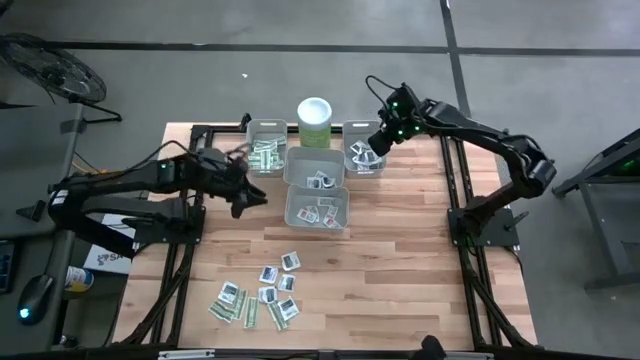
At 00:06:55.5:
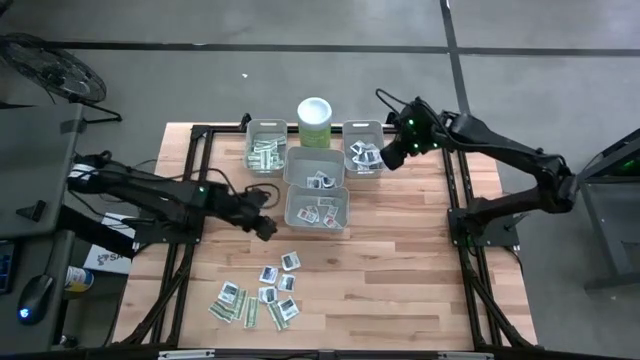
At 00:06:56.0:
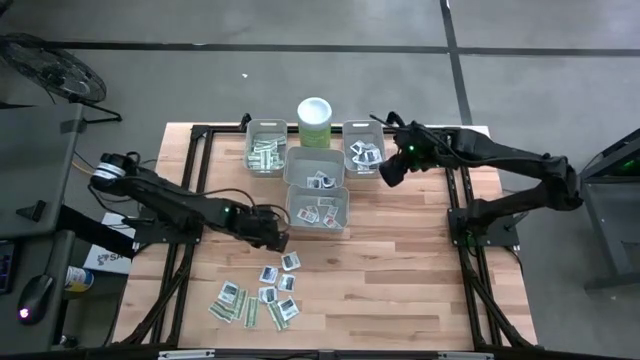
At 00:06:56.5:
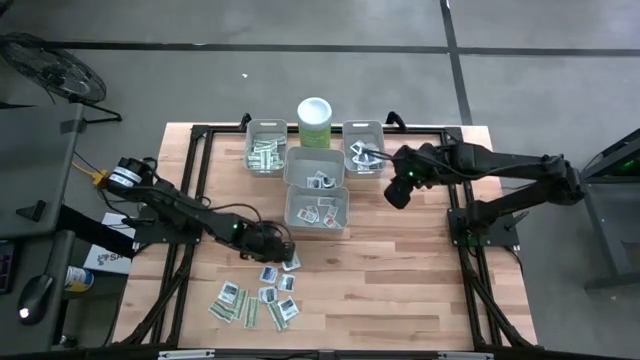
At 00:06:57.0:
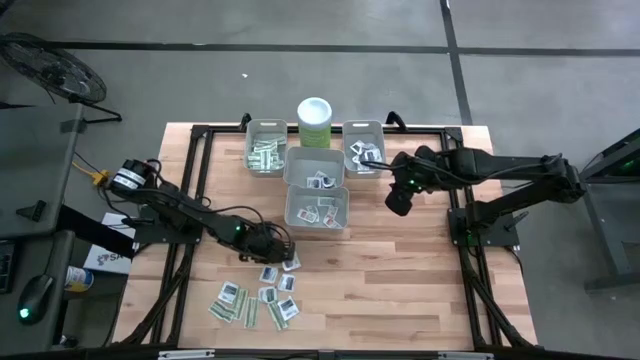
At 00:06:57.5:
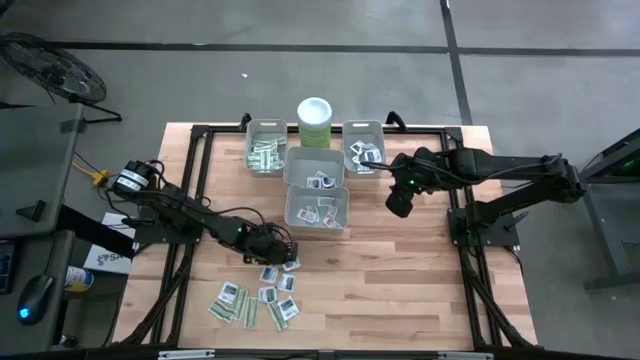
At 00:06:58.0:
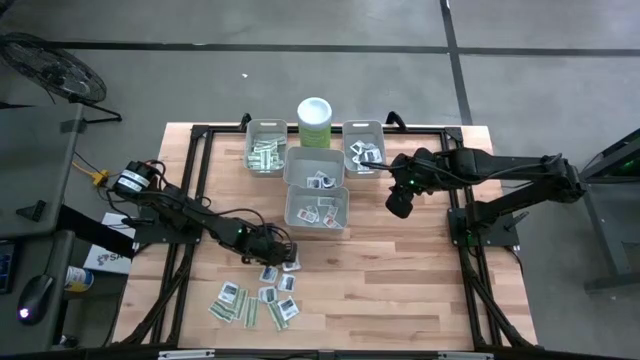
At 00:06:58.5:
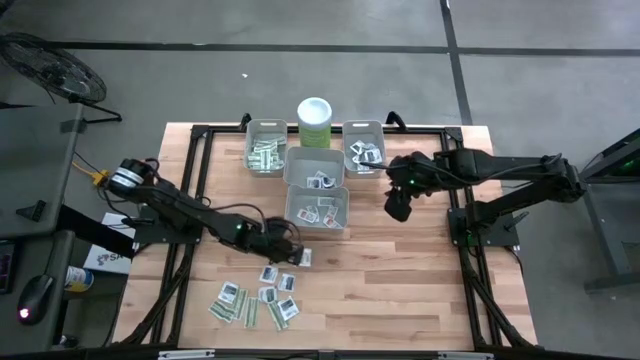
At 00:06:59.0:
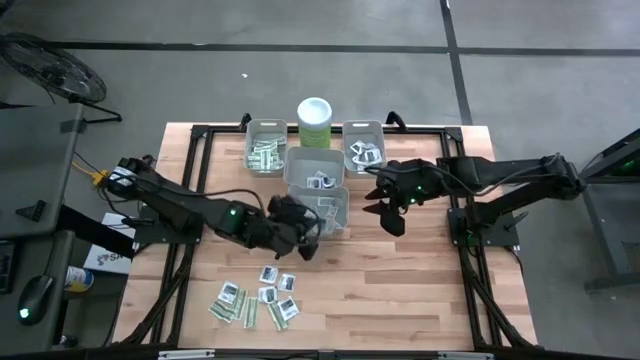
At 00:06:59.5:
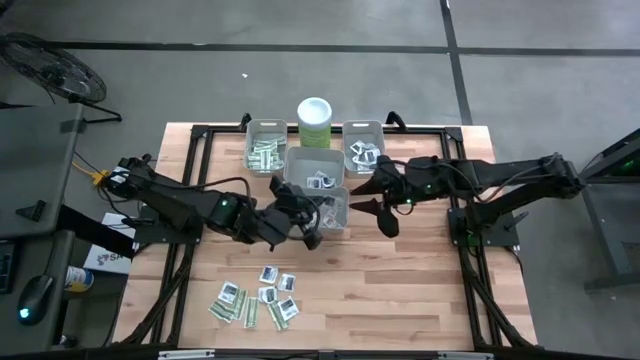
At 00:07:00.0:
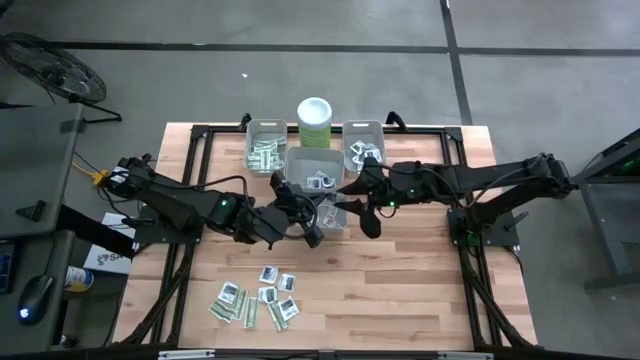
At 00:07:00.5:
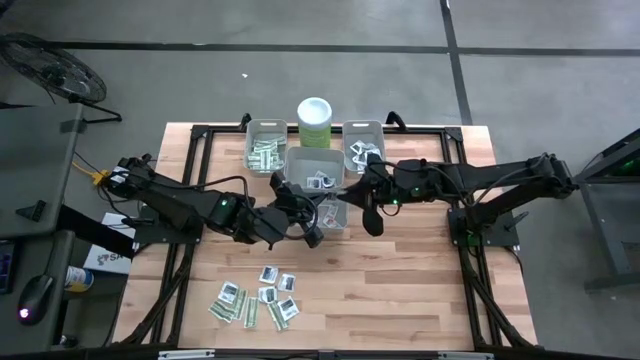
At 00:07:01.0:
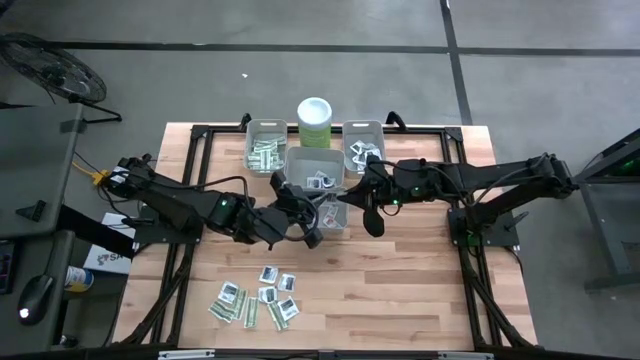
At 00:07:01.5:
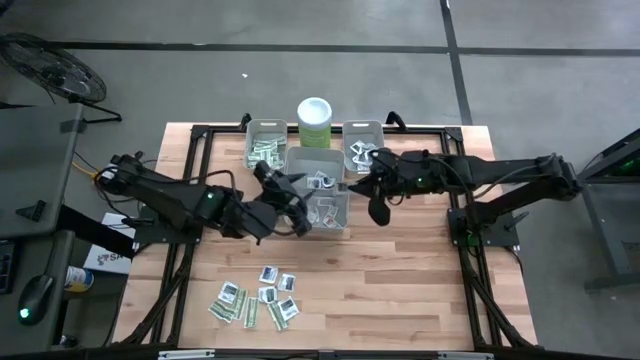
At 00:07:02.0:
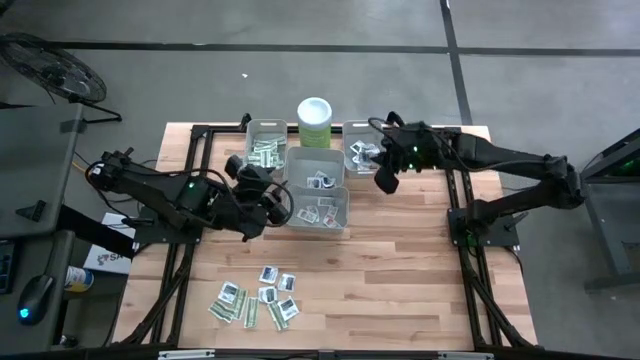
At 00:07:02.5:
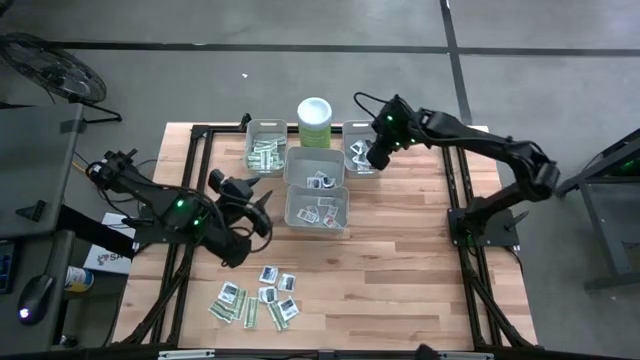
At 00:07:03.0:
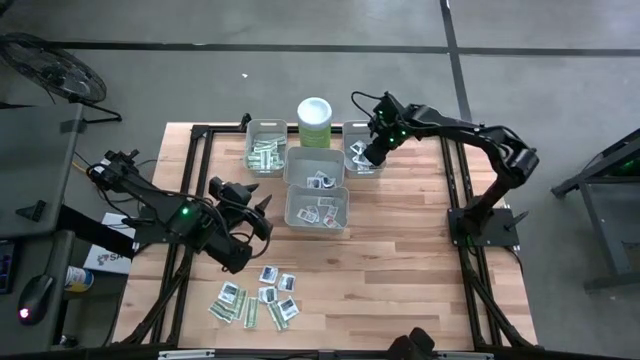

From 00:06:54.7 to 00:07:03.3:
Task: Pick & Place First Aid Supplies
Put the towelette pack into the right bin

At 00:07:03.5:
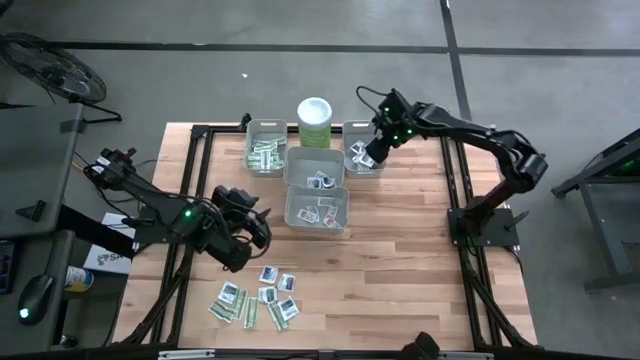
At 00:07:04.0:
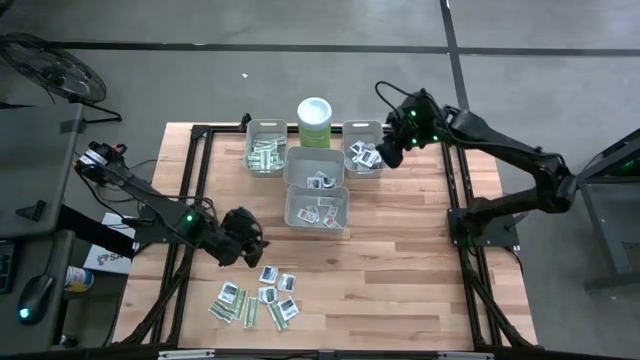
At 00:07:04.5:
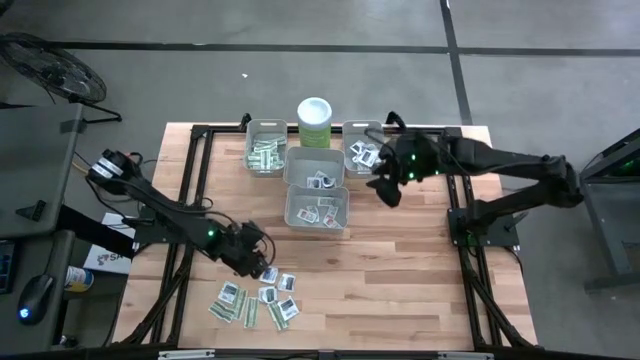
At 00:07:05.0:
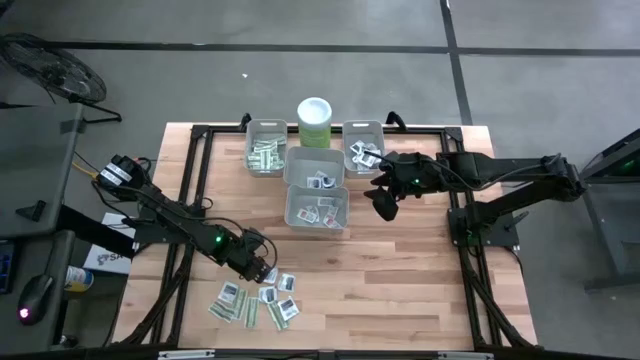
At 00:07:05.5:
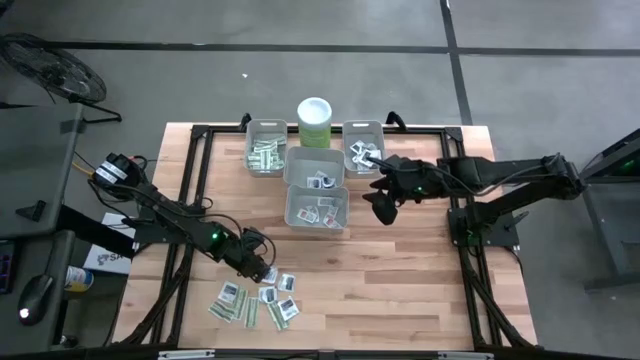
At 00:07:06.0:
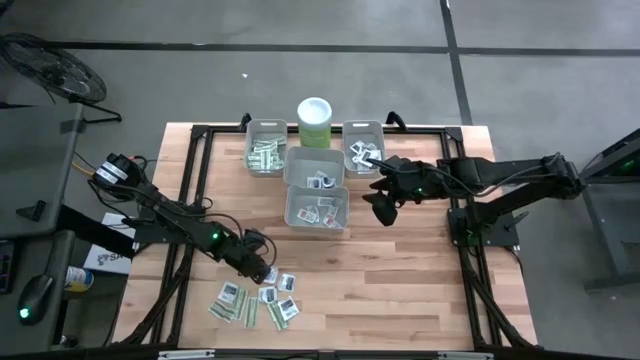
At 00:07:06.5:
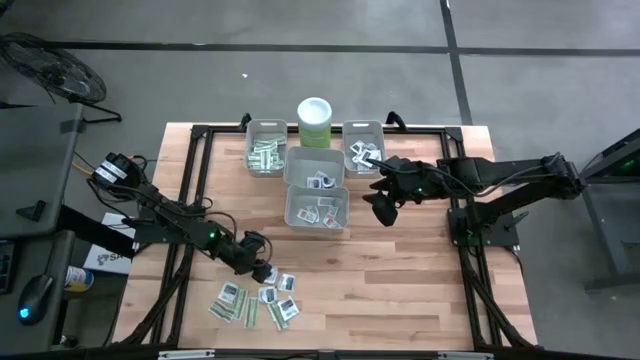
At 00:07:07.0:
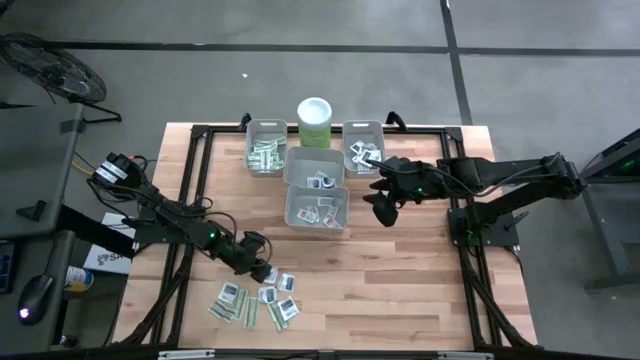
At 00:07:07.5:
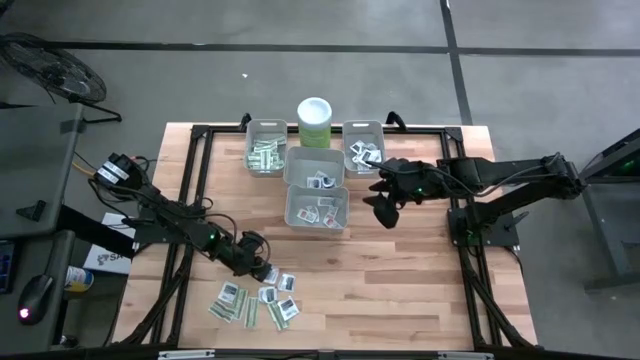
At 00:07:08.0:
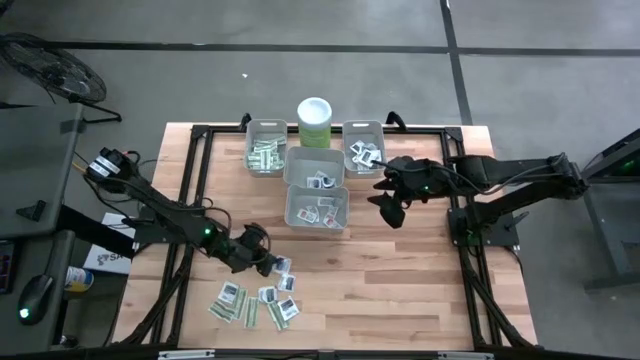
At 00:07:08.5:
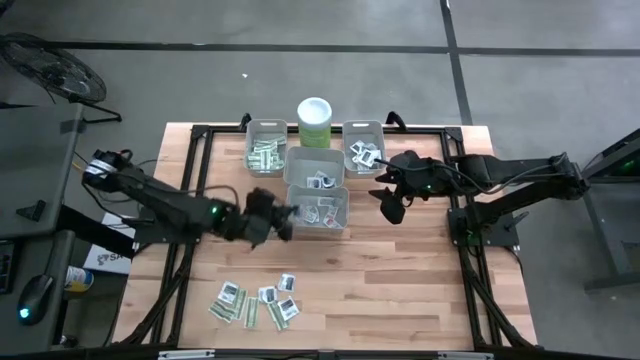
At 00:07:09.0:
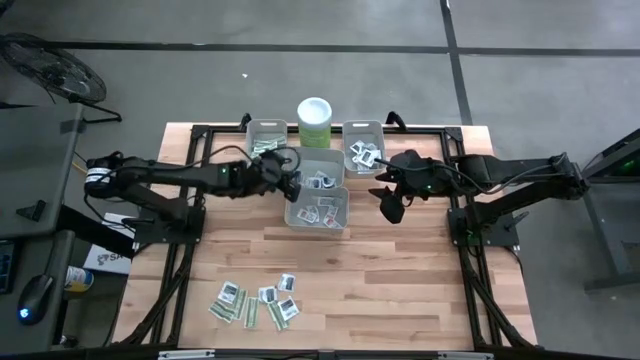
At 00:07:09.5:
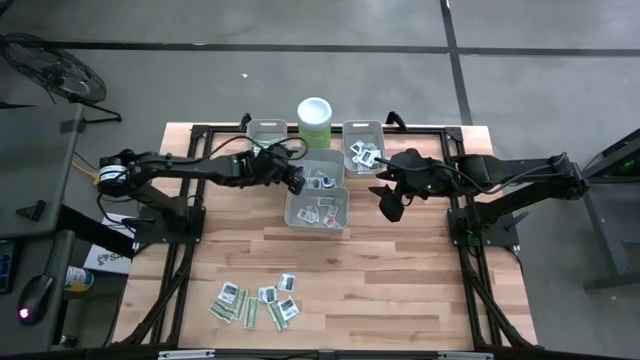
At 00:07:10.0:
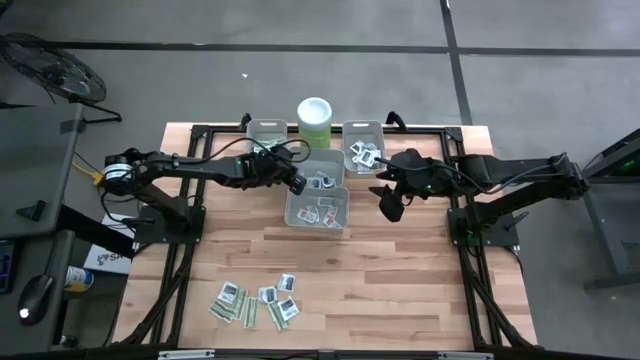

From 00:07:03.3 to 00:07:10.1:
Put the alcohol pad into the top center bin

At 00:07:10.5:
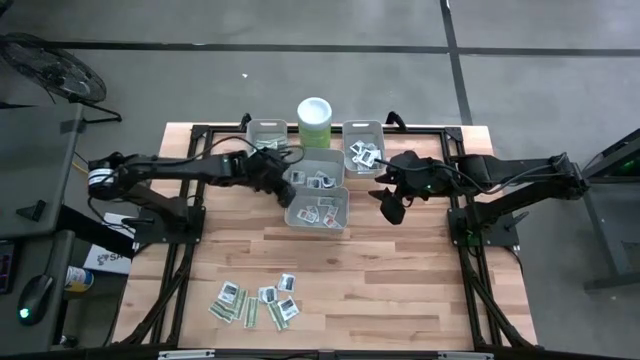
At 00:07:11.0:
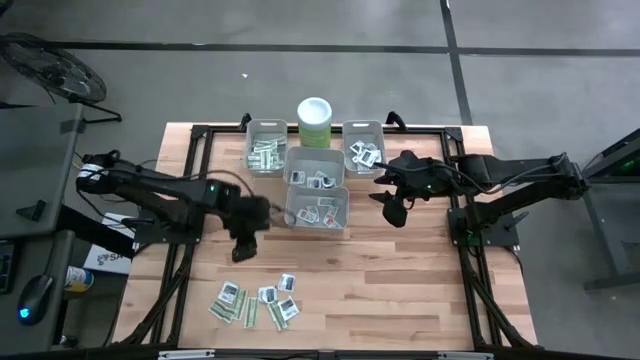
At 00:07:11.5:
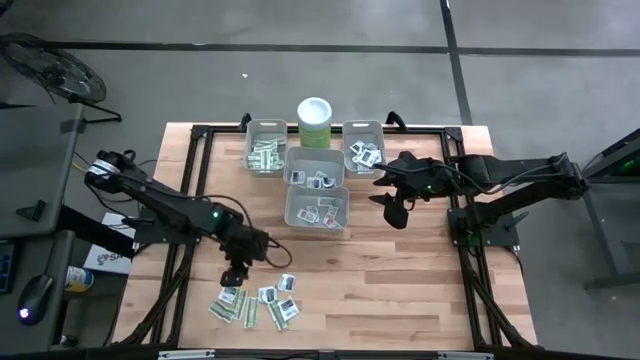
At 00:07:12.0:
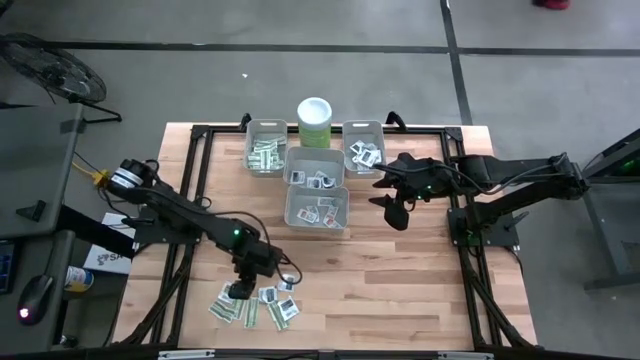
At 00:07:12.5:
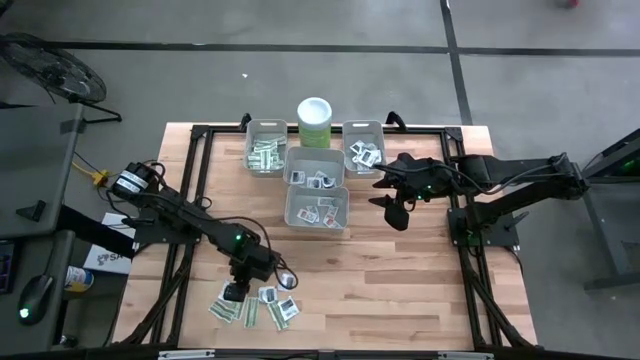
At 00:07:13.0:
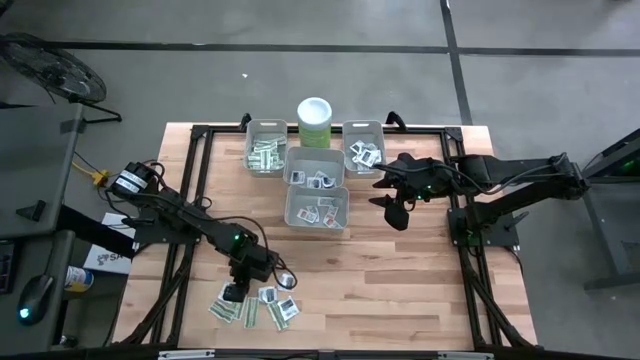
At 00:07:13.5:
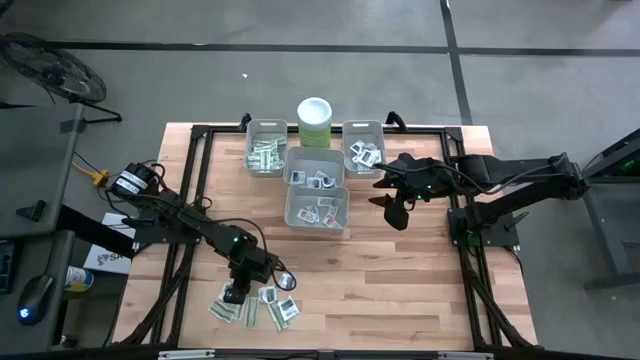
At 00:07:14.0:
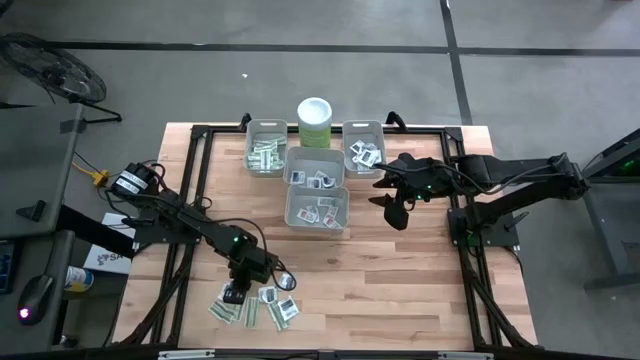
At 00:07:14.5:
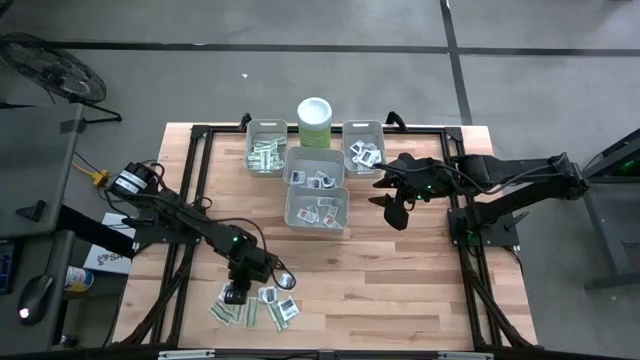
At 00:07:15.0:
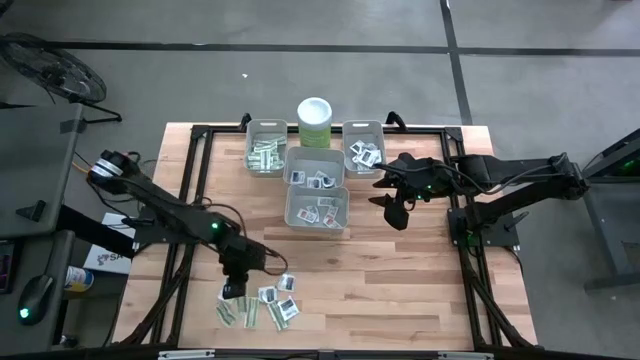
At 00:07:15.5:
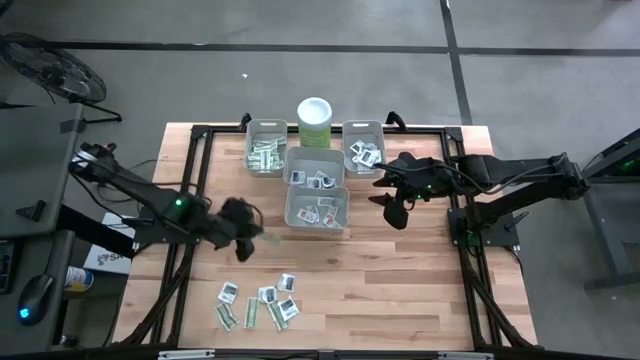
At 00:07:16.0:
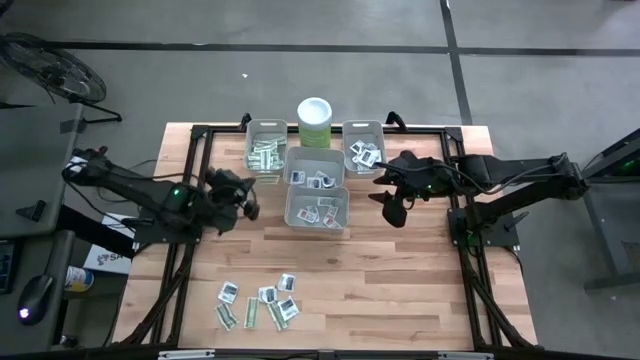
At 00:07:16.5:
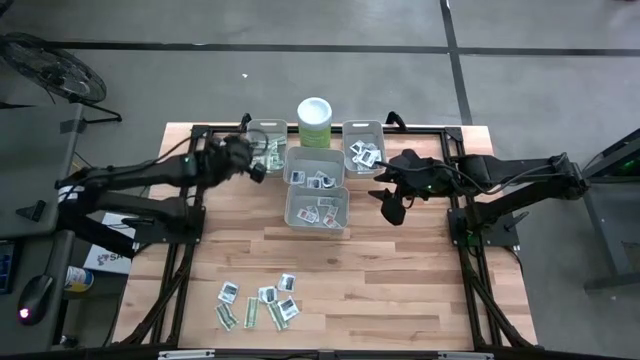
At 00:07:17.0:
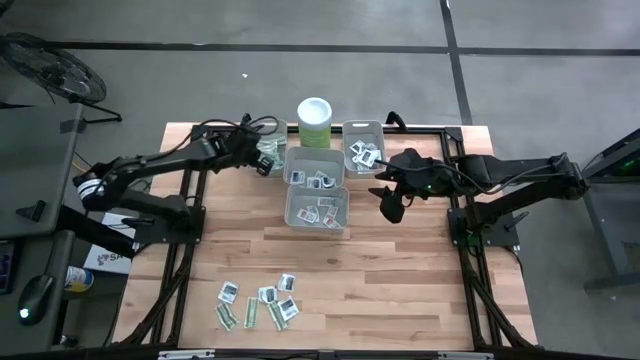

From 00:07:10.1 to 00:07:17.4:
Put the bandage pack into the left bin
